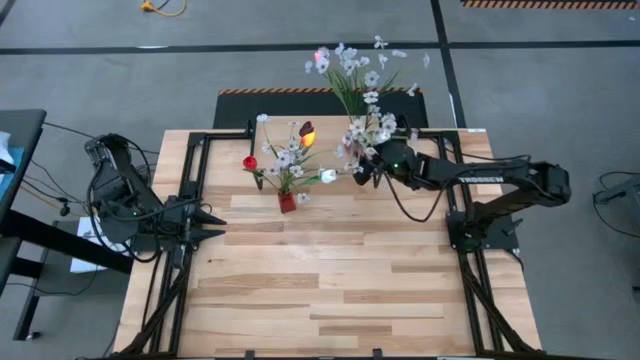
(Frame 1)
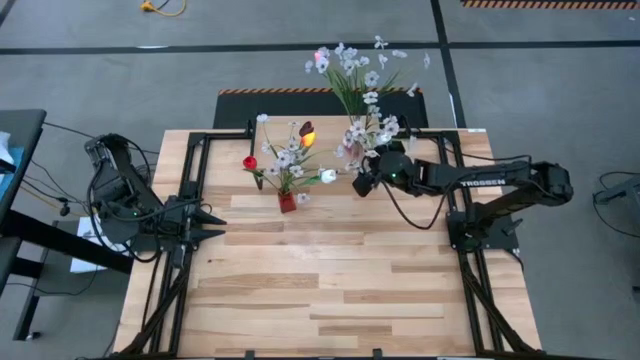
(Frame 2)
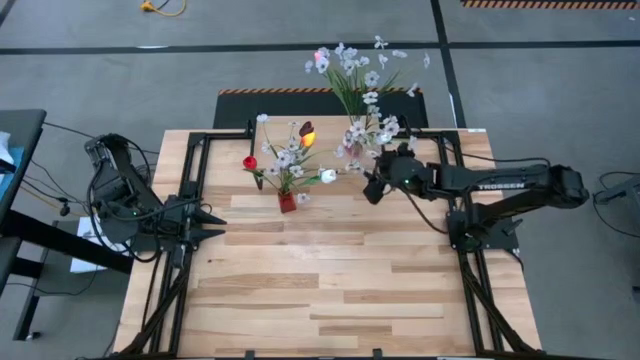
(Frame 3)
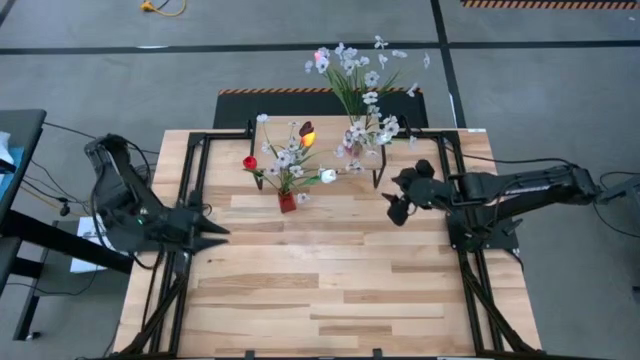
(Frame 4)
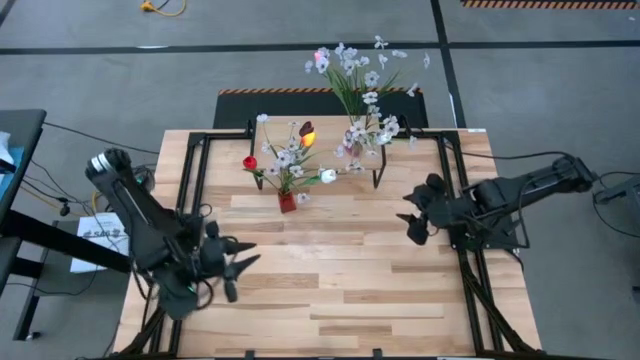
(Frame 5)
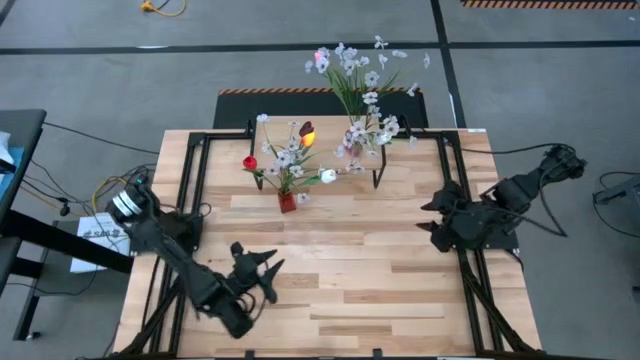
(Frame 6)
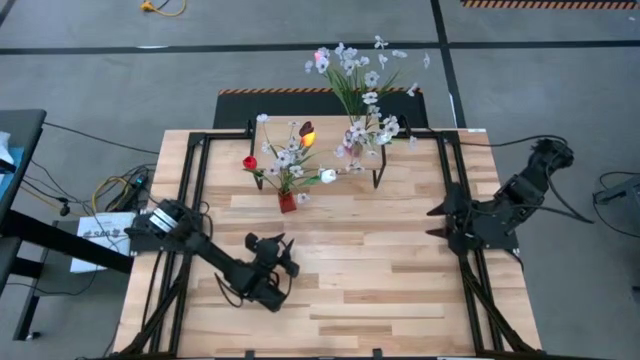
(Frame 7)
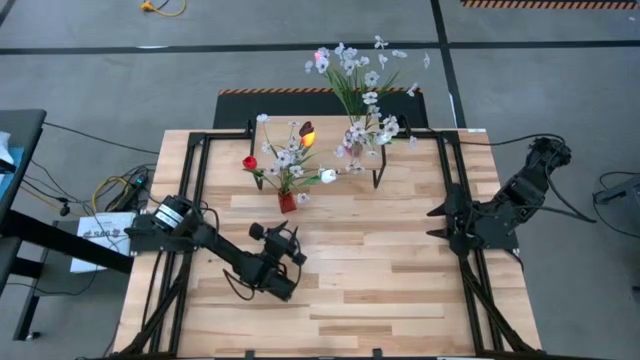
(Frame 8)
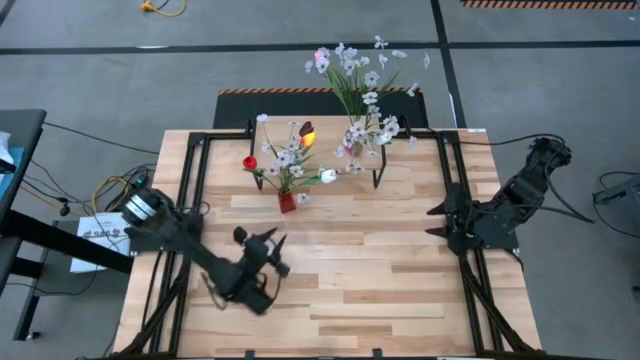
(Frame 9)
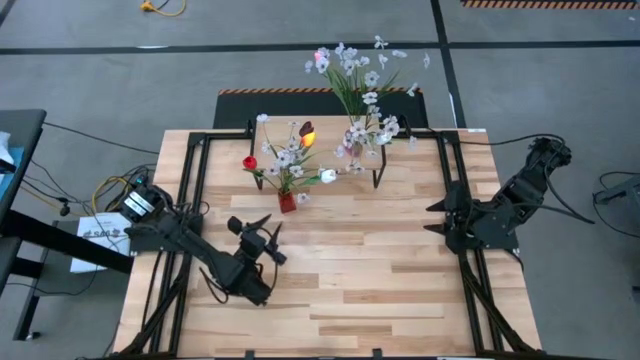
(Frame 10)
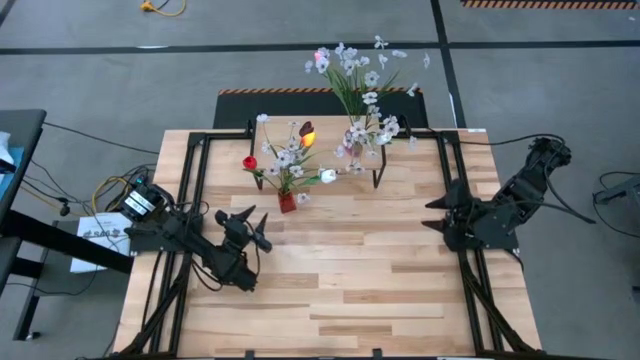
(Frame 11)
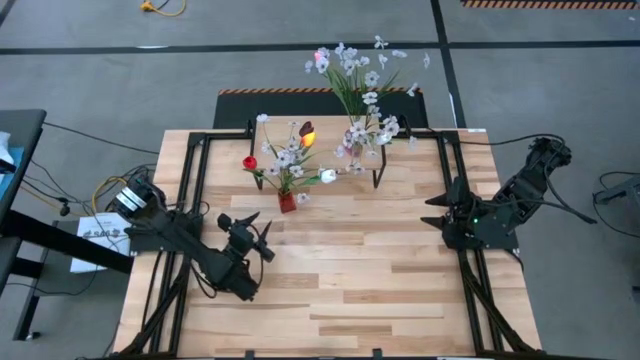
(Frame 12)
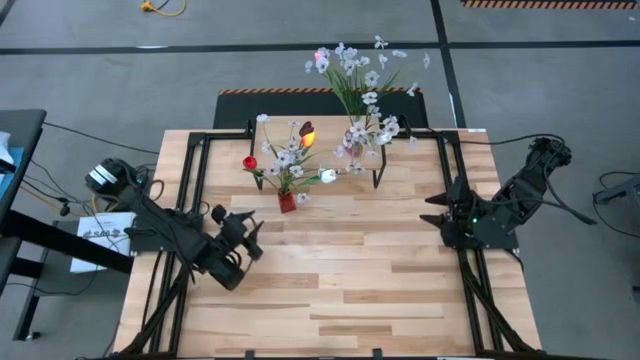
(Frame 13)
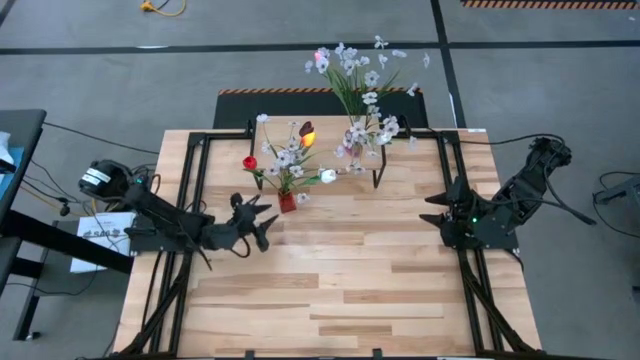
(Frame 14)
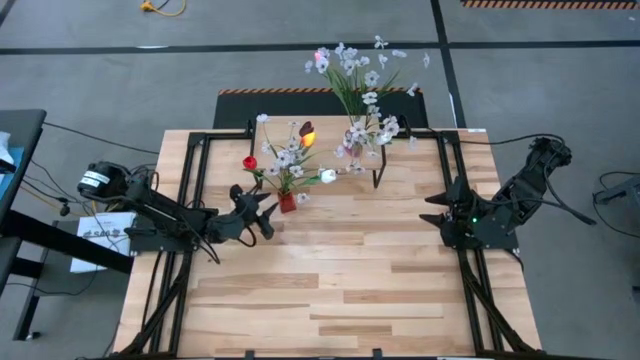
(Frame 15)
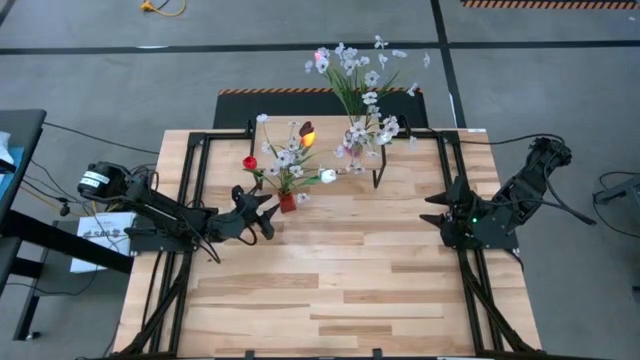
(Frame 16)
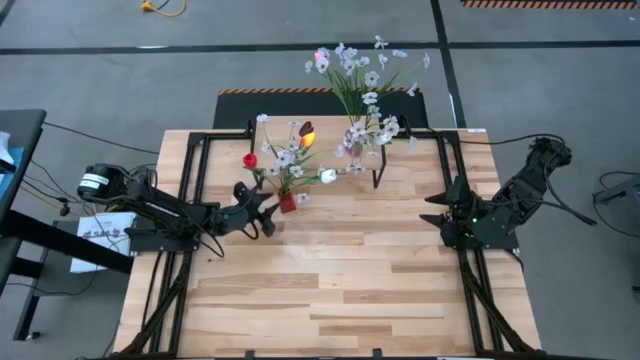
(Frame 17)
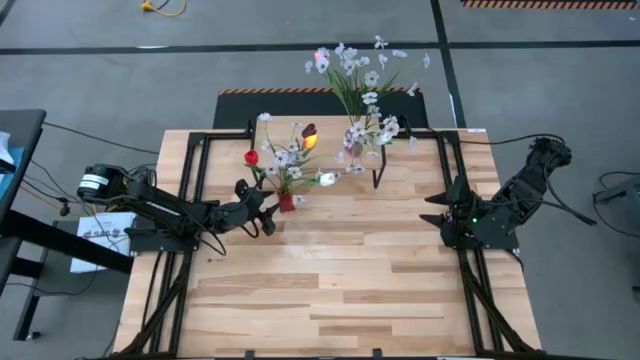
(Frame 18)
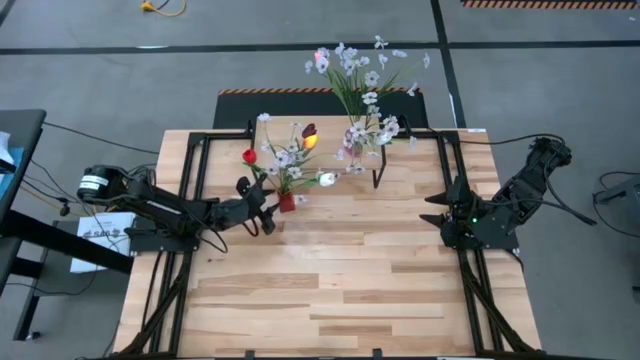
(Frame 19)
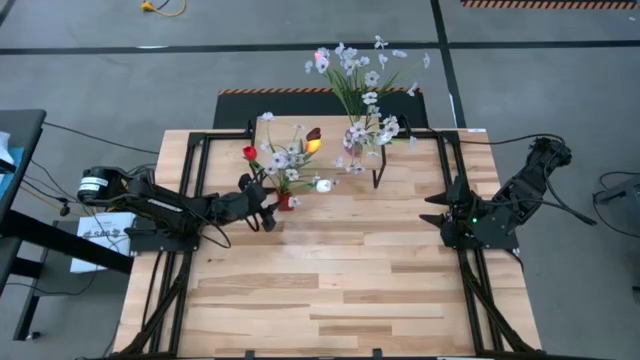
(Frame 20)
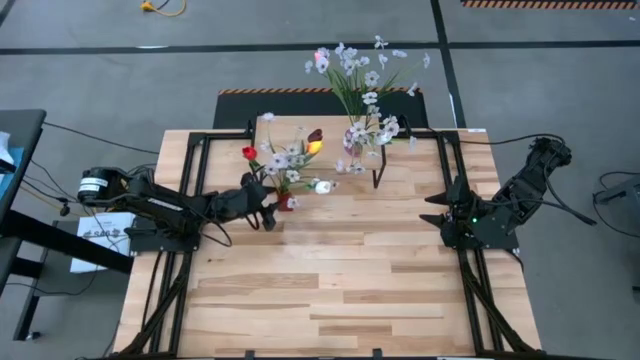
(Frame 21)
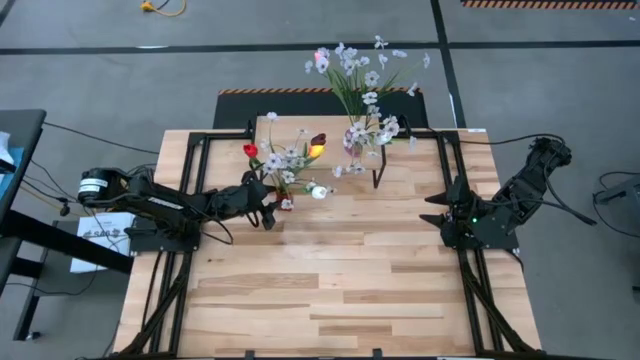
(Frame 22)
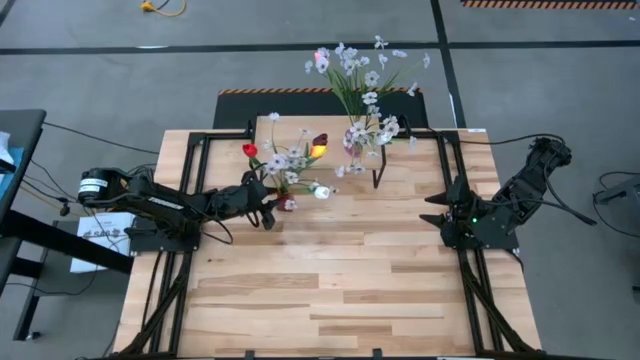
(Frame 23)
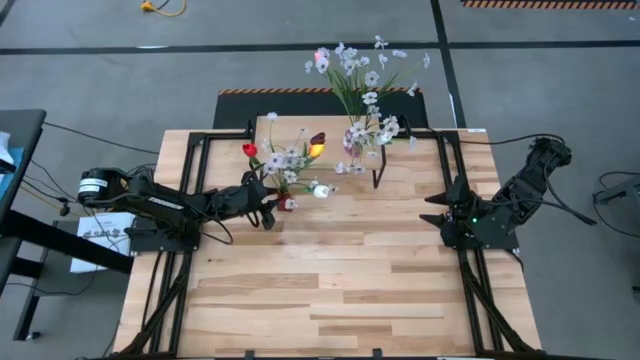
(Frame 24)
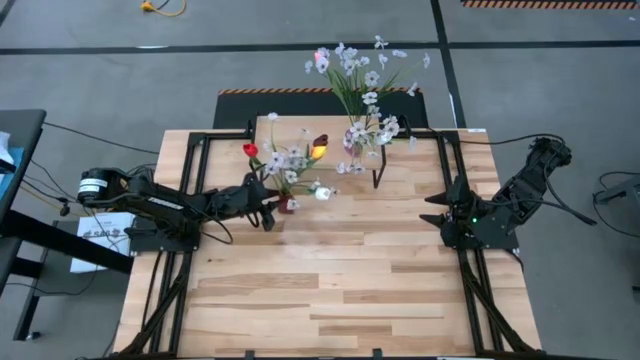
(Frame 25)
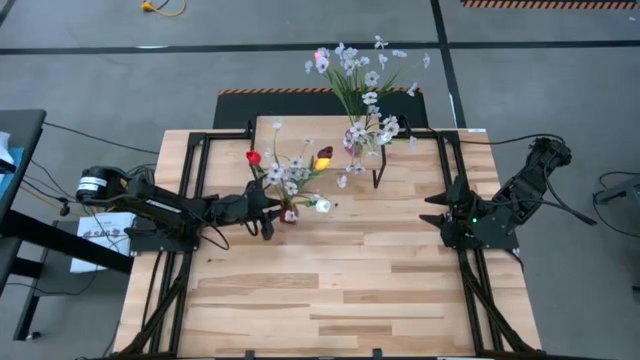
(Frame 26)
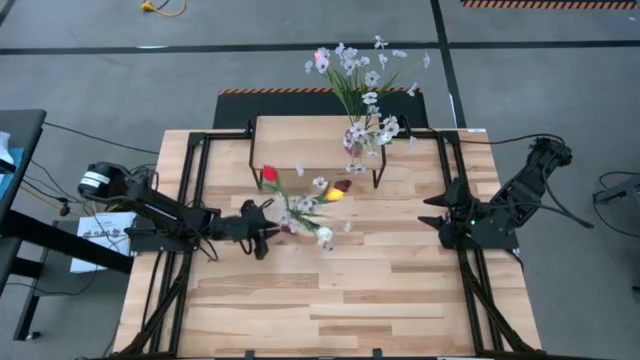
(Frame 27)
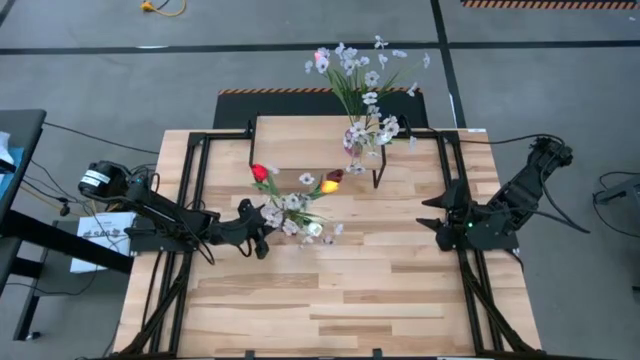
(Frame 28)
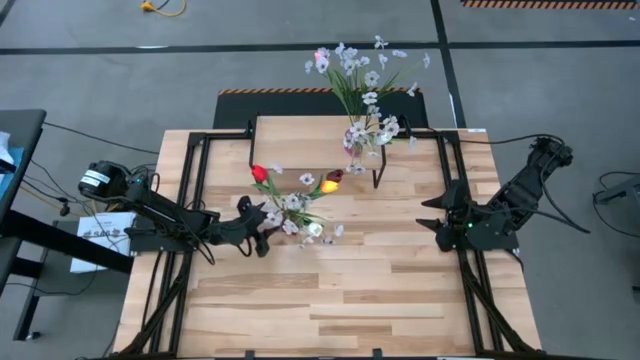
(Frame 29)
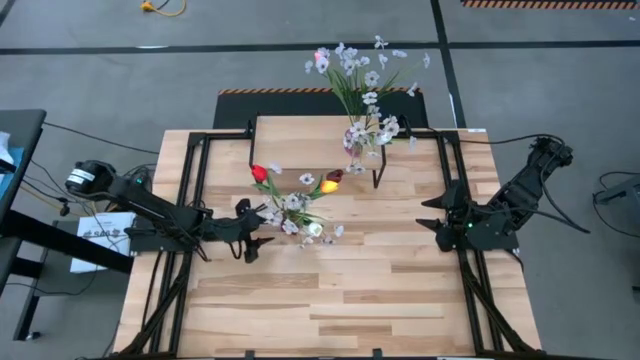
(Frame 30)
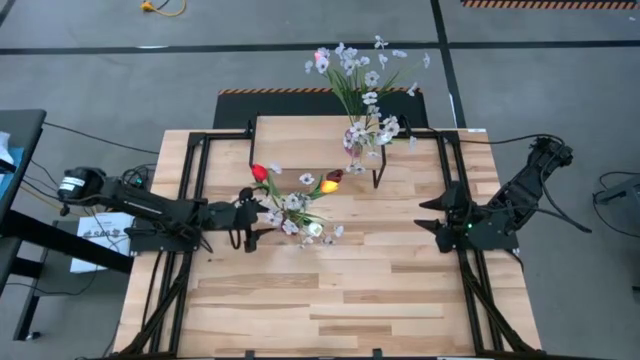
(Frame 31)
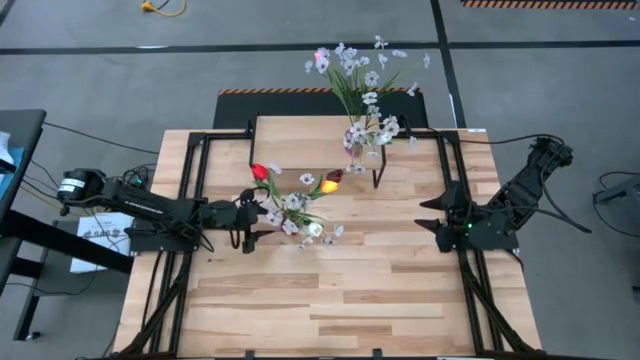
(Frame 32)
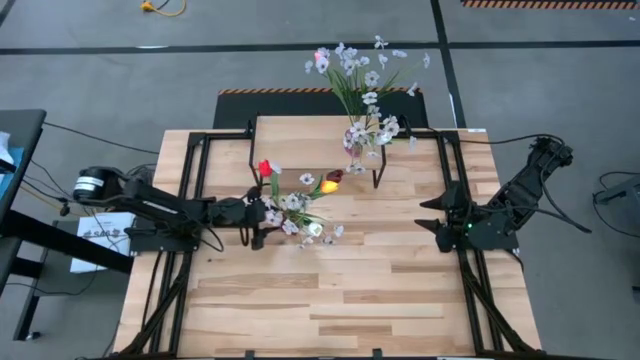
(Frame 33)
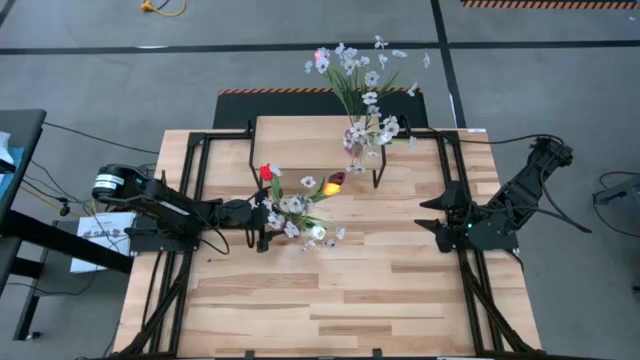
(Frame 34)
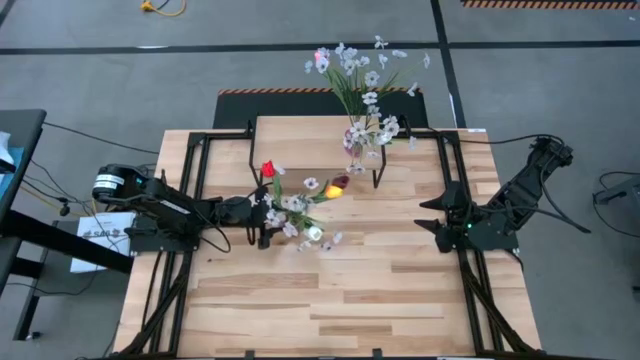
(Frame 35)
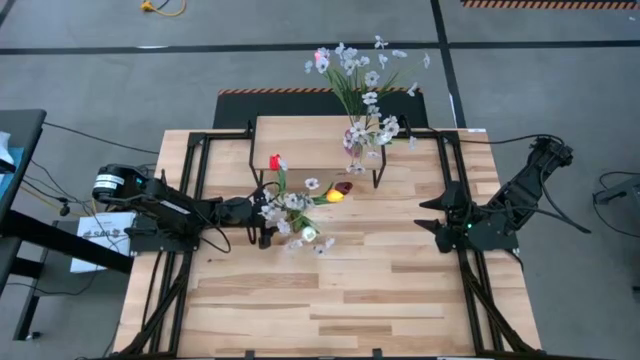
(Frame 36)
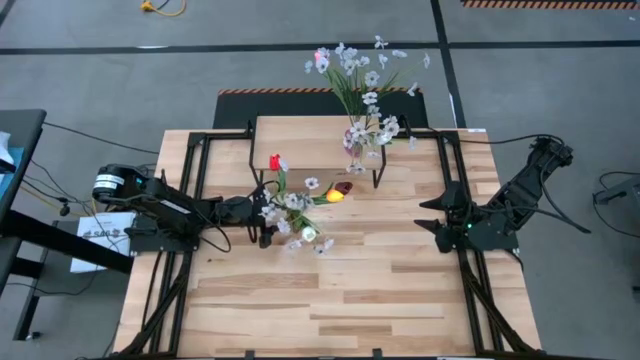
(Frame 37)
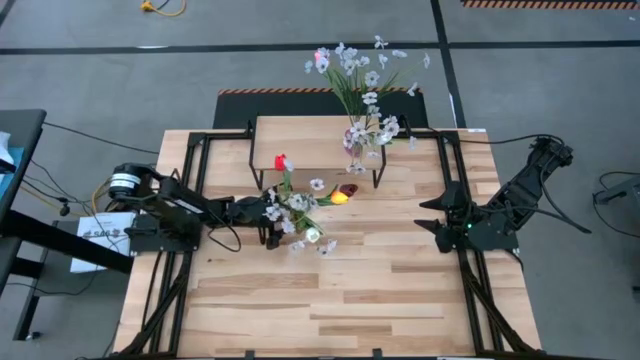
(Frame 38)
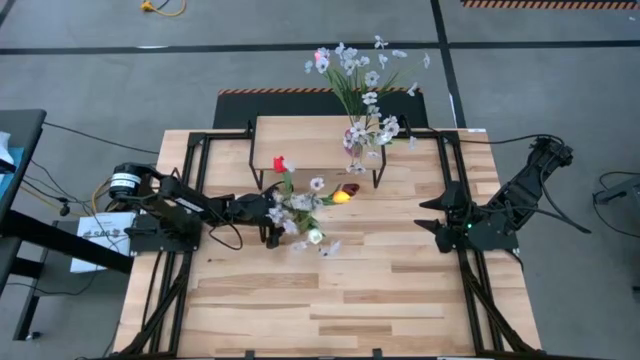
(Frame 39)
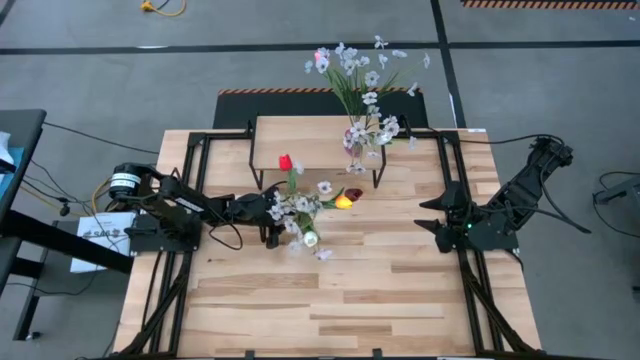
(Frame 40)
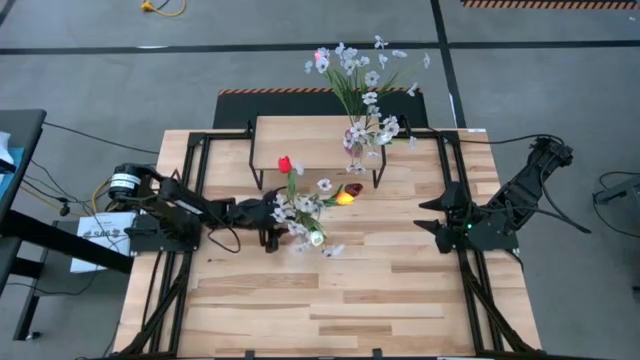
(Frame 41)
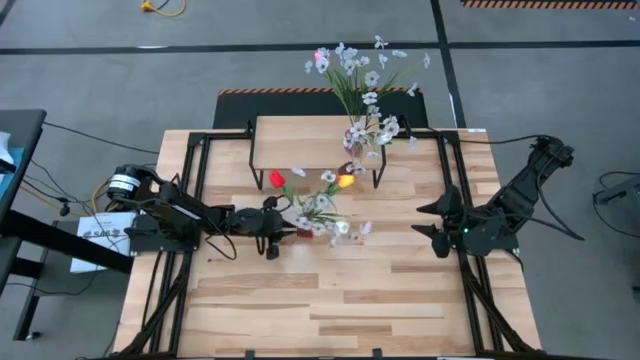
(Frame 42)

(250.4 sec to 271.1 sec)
Task: Pick and place flowers into a vace then onto a shelf
Put the red vase on the shelf
